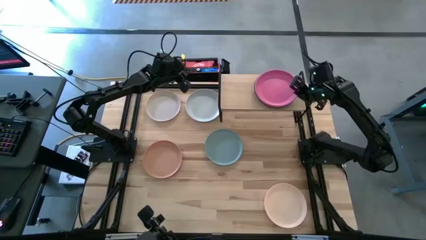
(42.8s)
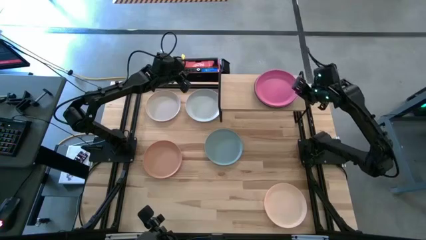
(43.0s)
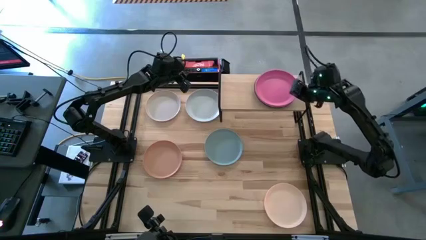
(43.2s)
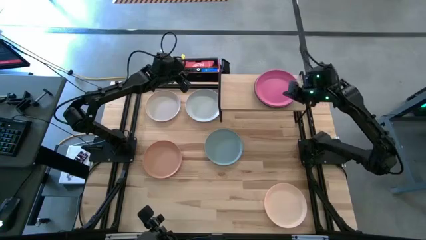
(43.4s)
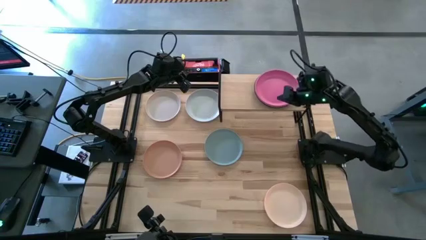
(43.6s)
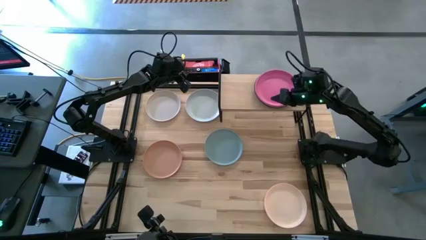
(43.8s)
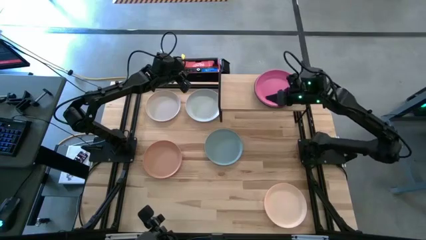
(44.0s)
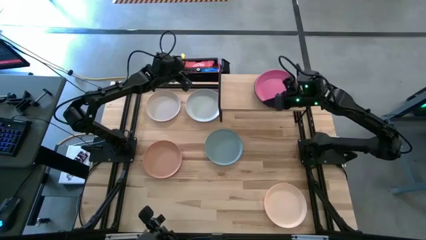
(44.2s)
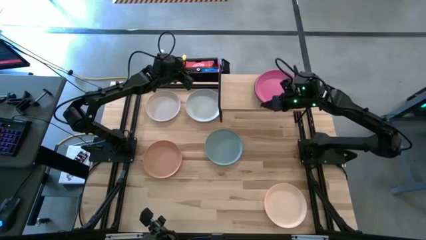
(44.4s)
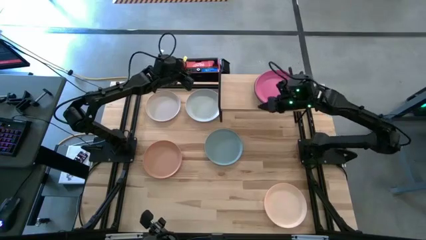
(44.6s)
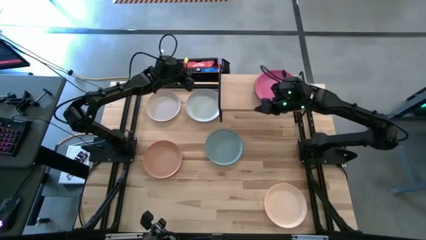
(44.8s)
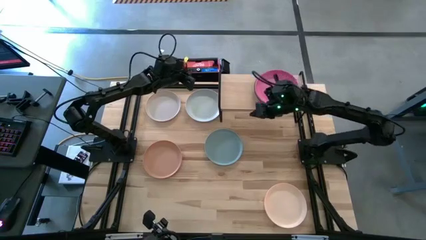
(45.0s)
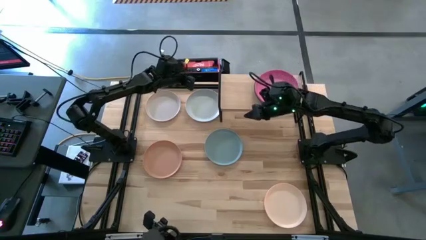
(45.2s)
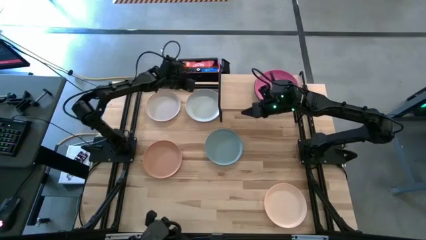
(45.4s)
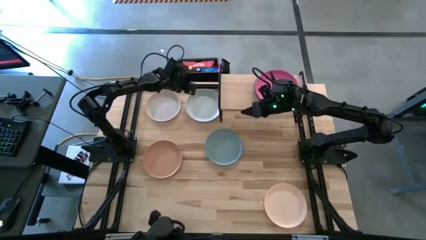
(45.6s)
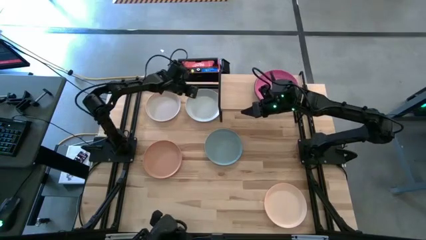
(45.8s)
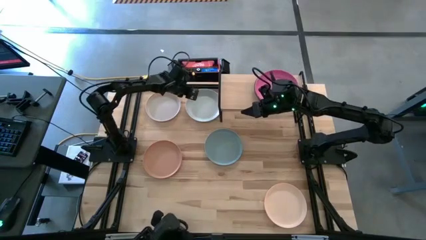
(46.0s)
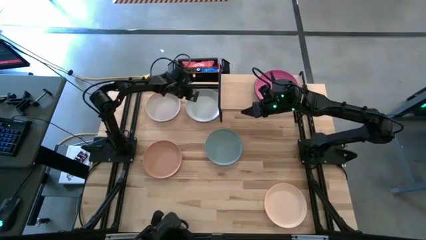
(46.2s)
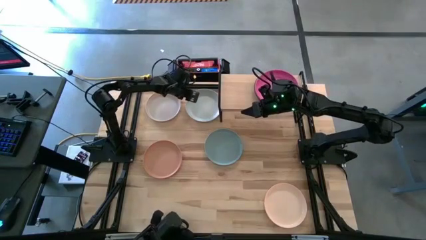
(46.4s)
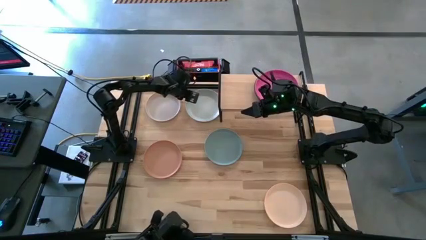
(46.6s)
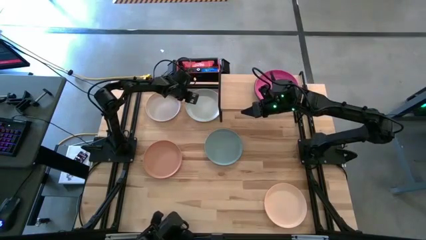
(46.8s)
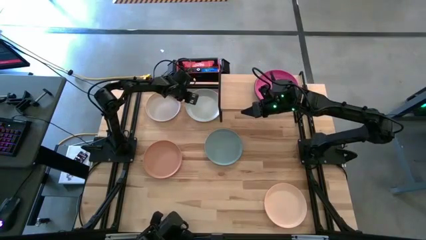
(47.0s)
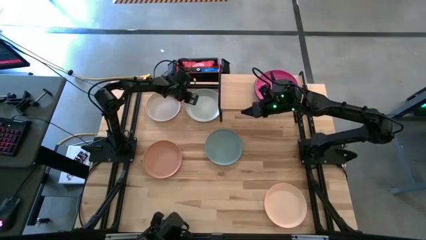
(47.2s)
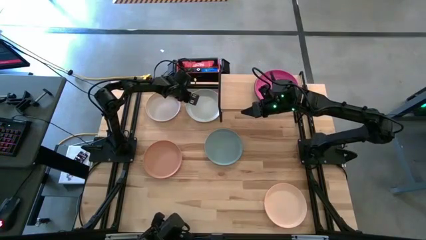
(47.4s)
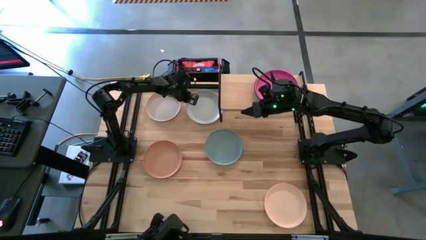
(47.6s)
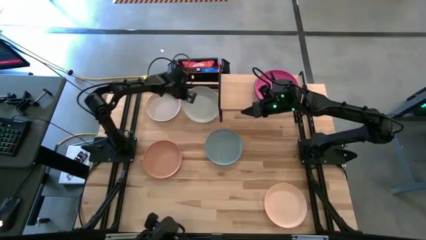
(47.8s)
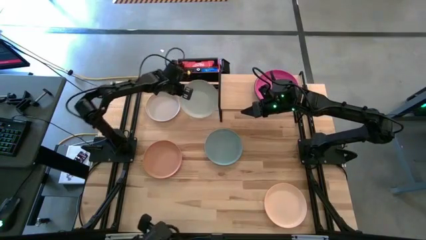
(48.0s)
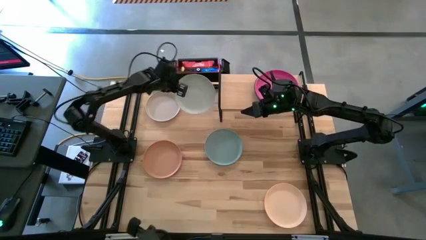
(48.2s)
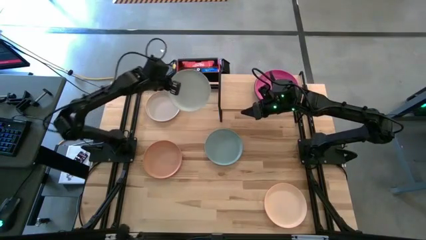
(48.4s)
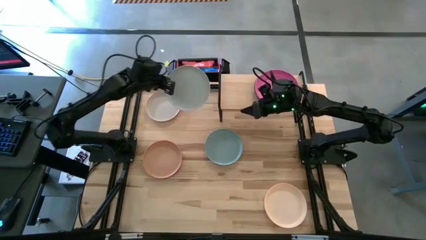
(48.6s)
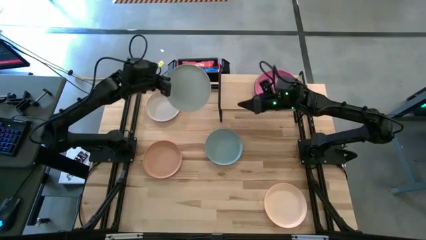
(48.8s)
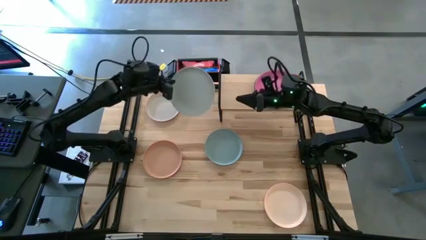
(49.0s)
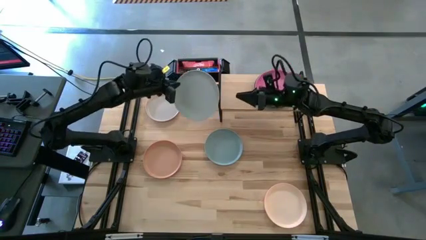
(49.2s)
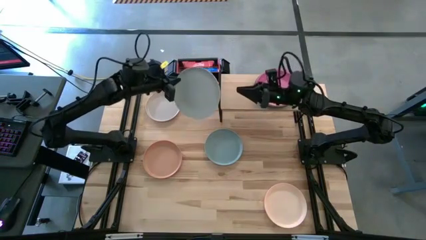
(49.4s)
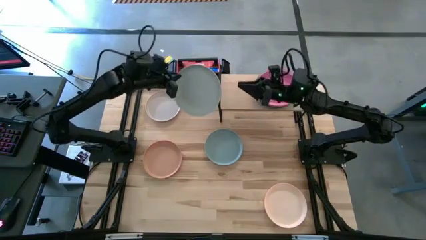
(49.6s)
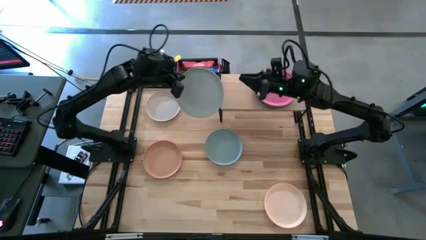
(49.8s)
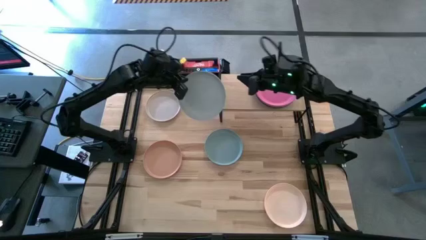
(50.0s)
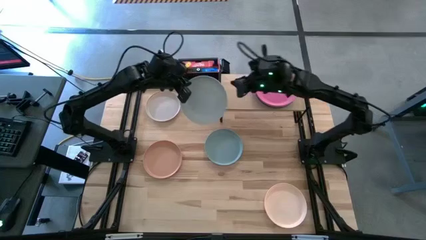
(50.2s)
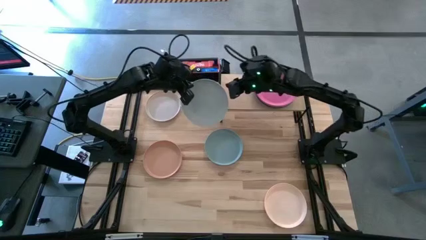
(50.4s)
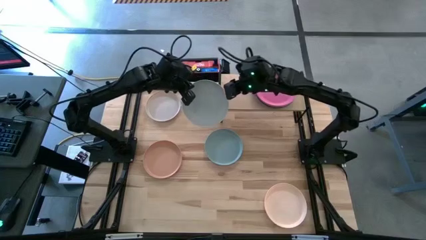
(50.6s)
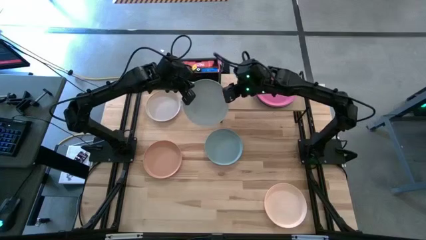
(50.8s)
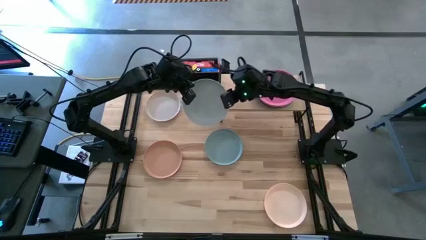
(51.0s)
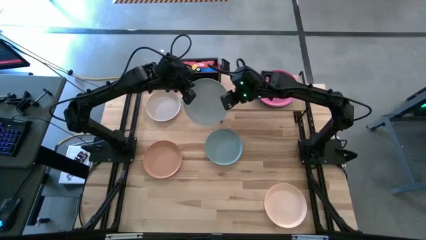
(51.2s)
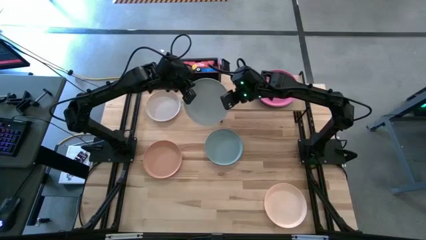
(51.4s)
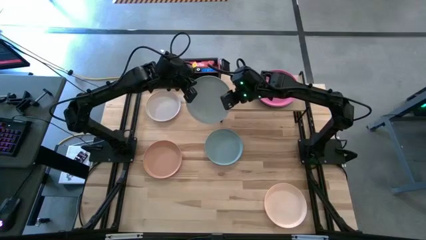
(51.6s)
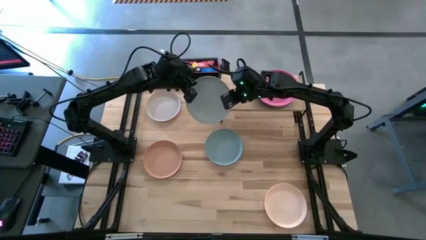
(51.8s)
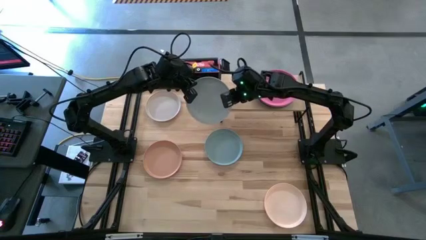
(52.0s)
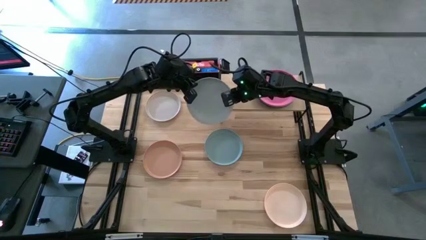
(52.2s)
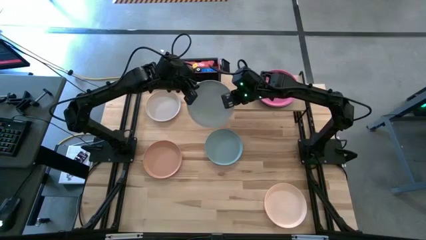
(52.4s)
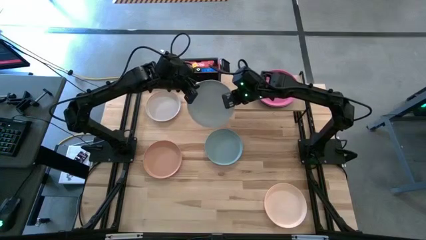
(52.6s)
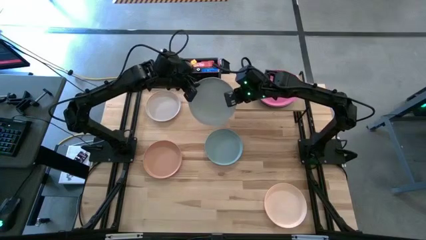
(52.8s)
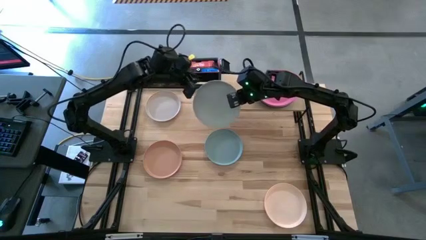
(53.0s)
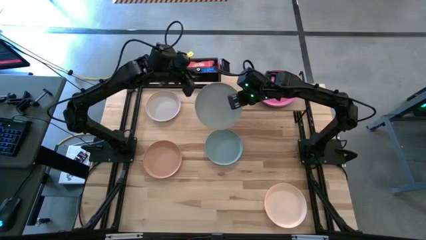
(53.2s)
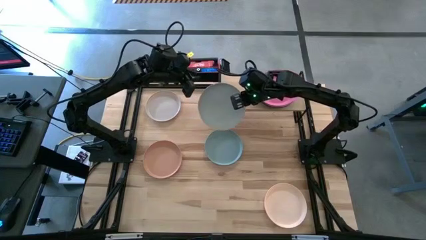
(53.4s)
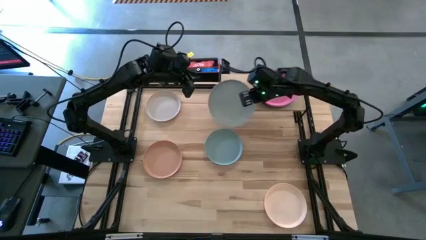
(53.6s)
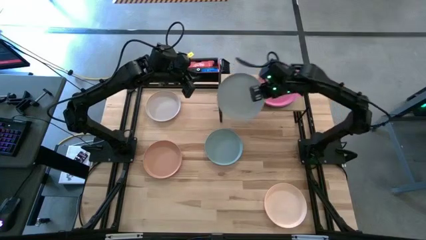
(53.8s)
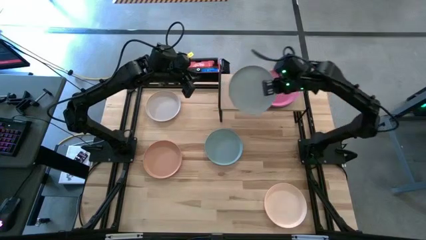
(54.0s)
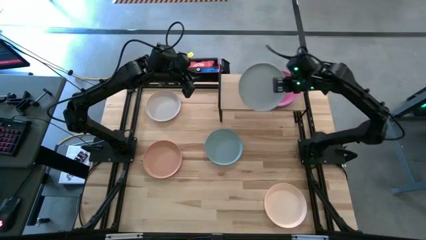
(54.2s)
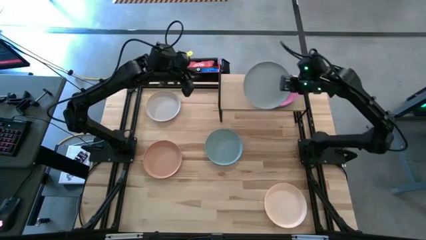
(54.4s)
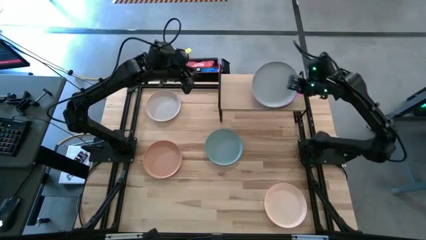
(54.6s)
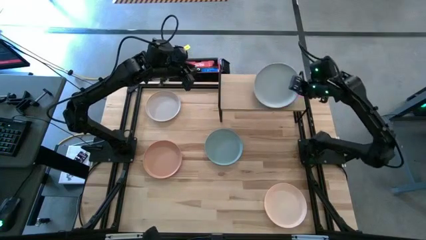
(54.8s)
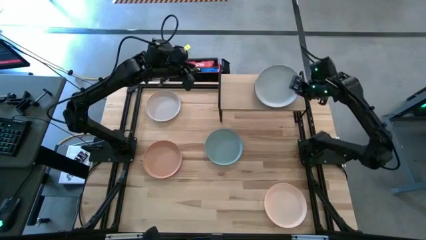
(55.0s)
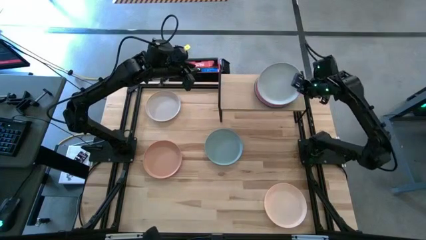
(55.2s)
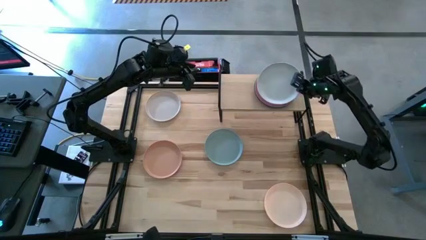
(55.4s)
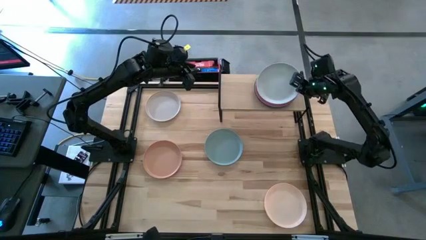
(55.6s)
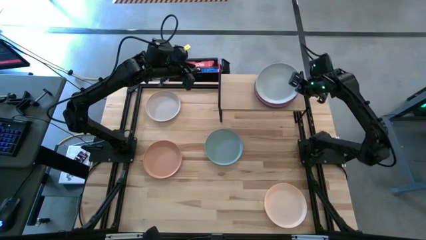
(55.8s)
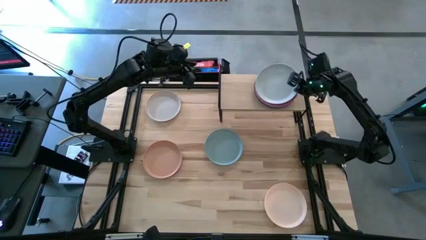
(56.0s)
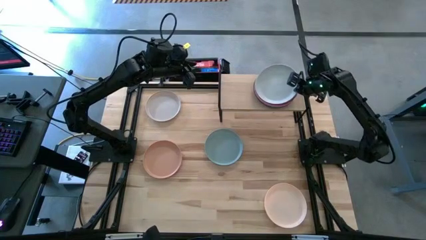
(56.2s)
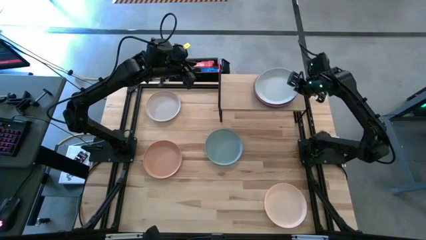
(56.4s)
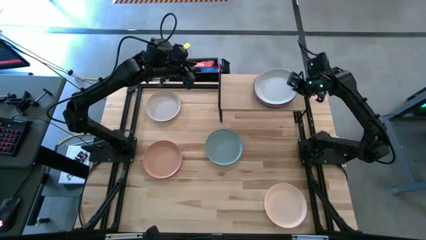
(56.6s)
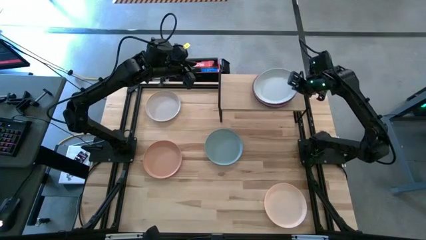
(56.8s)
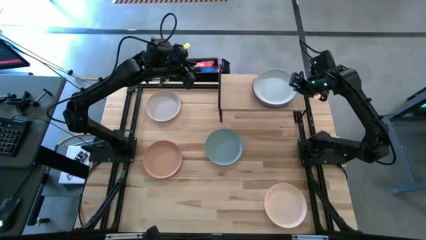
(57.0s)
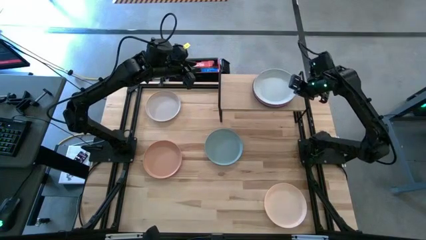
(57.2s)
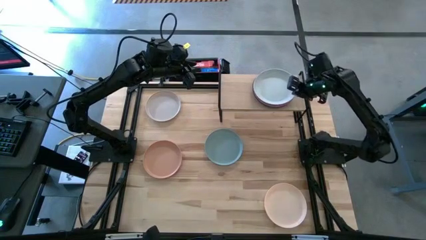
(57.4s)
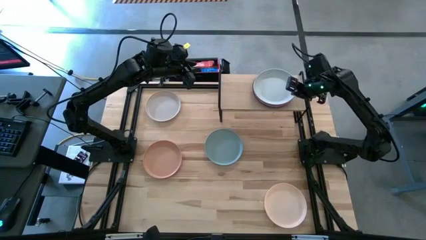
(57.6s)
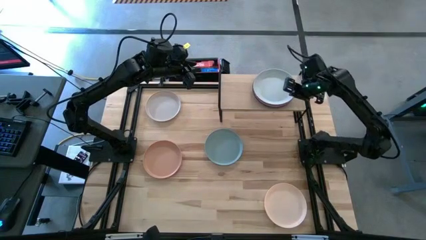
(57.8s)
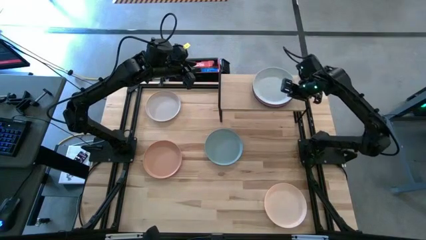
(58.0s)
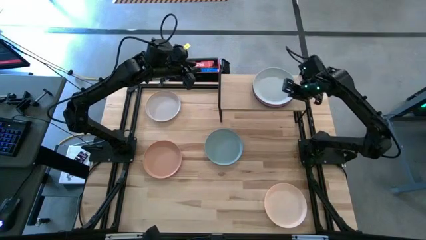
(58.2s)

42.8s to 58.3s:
Task: Place and stack plates onto a shelf
Stack the white plate on top of the pink plate on the shelf

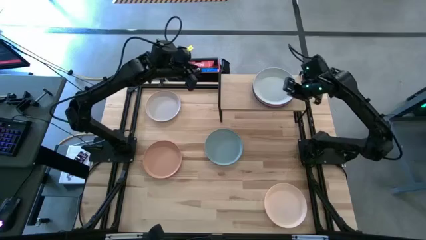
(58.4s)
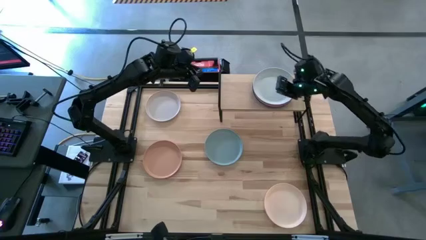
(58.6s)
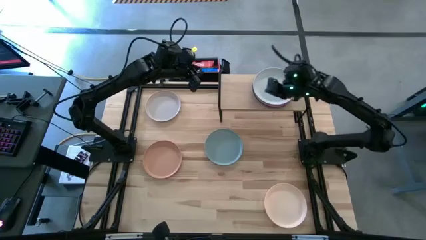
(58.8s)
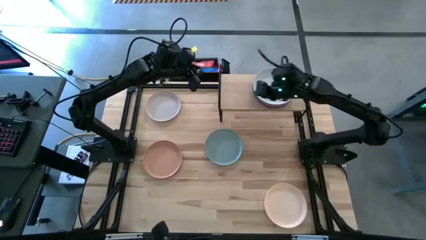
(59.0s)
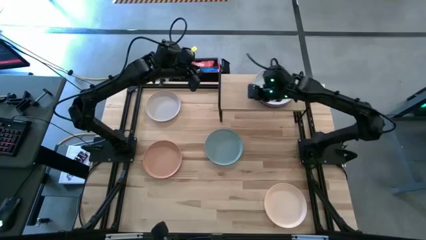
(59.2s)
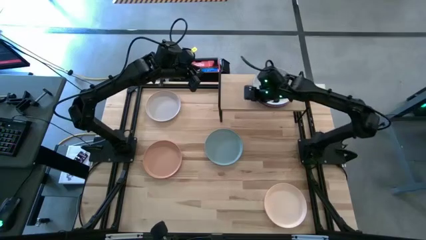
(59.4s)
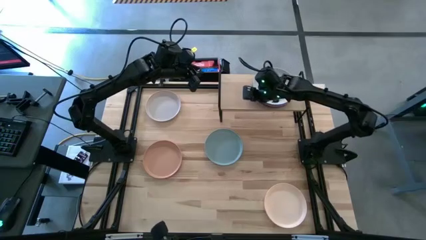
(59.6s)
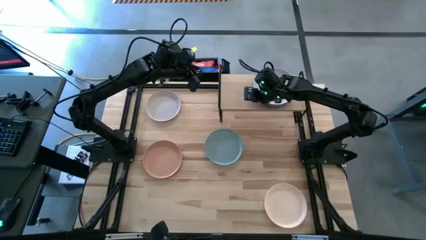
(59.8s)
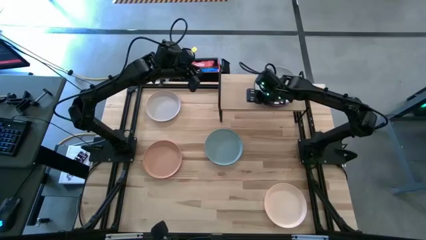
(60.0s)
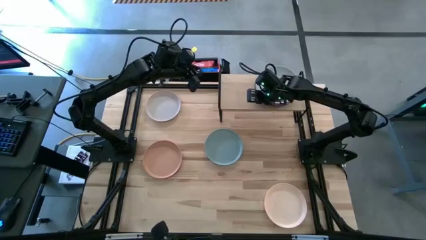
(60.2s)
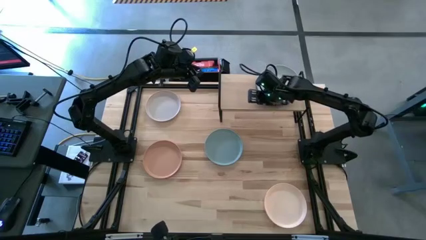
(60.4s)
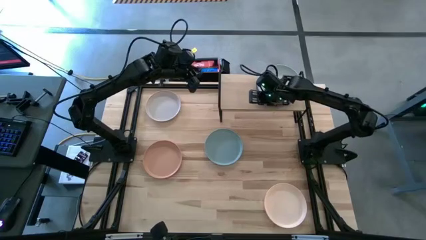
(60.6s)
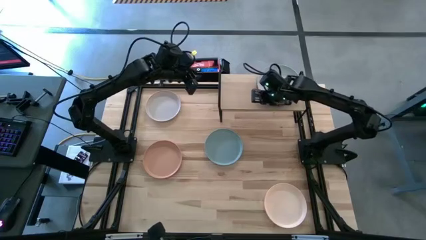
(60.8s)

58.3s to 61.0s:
Adjust the stacked plates on the shelf
